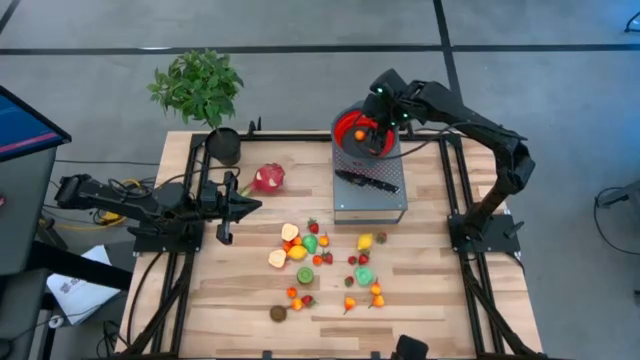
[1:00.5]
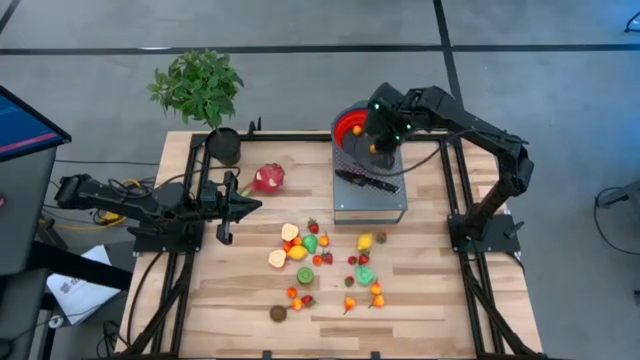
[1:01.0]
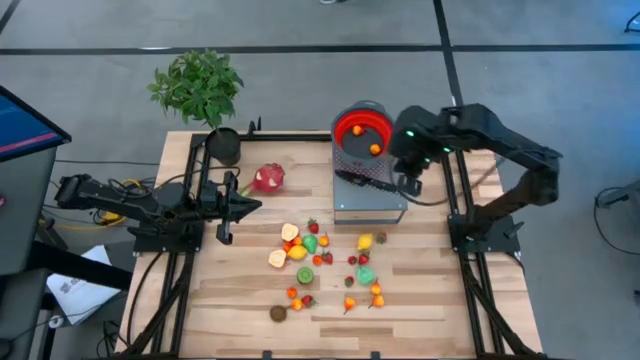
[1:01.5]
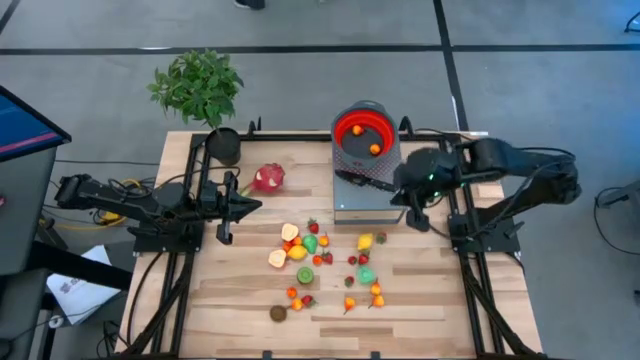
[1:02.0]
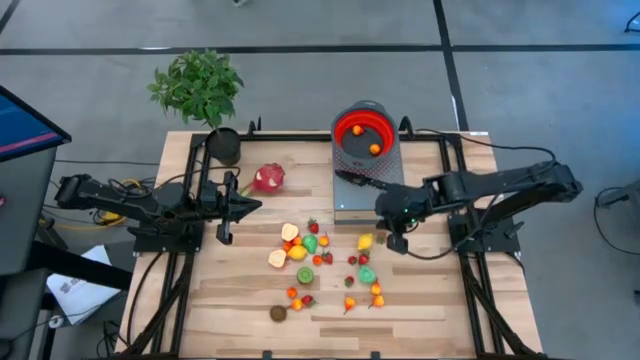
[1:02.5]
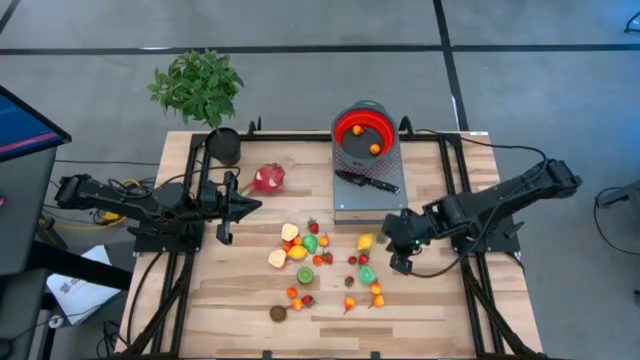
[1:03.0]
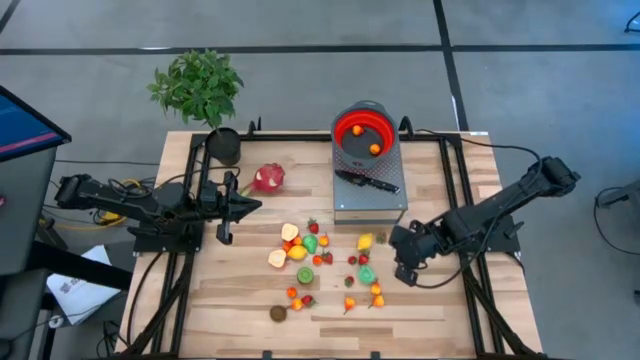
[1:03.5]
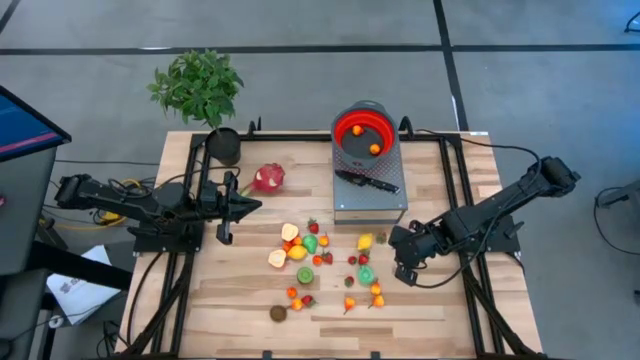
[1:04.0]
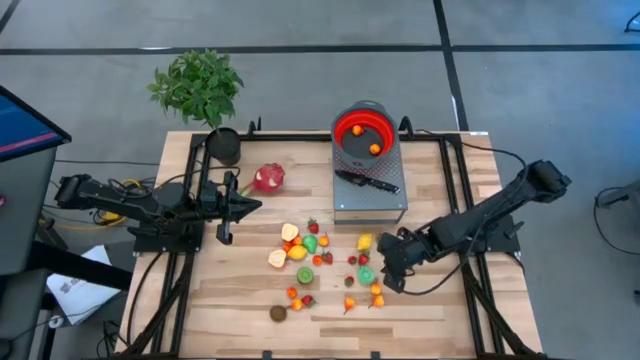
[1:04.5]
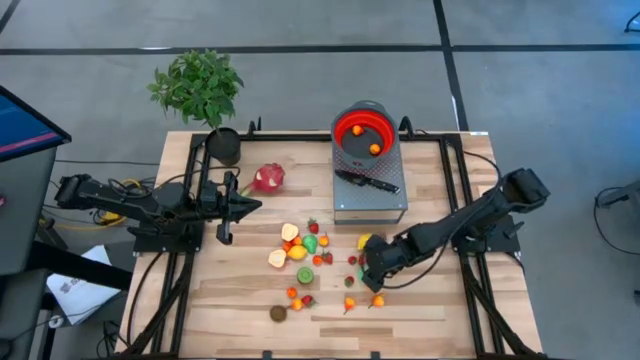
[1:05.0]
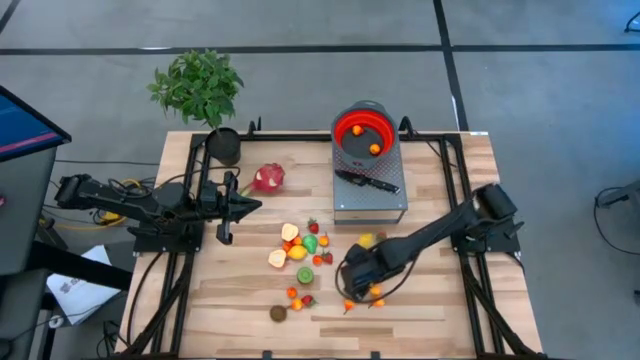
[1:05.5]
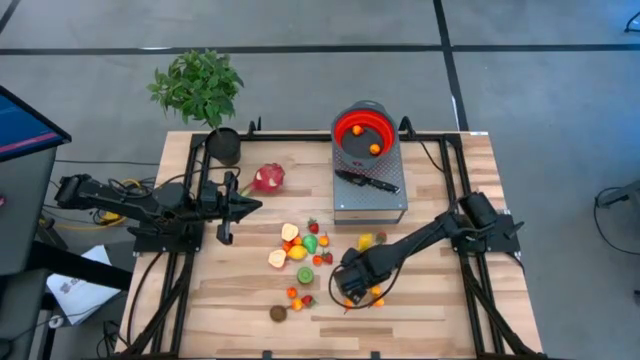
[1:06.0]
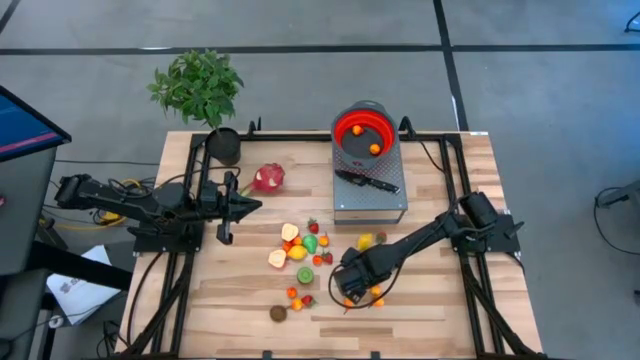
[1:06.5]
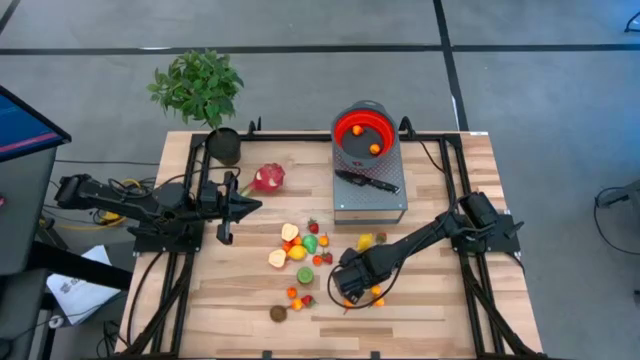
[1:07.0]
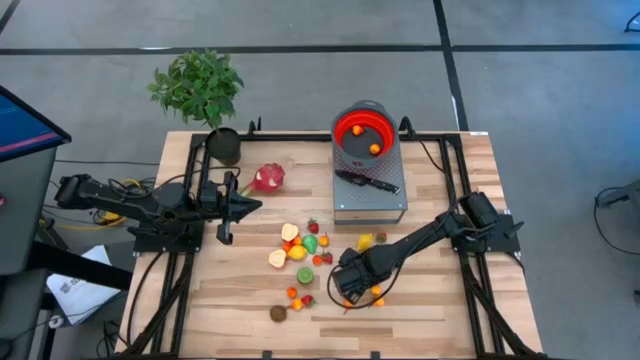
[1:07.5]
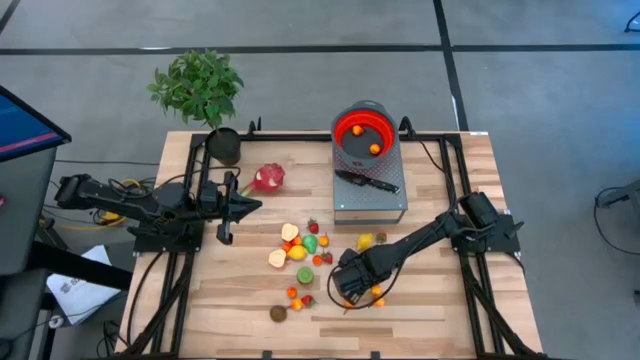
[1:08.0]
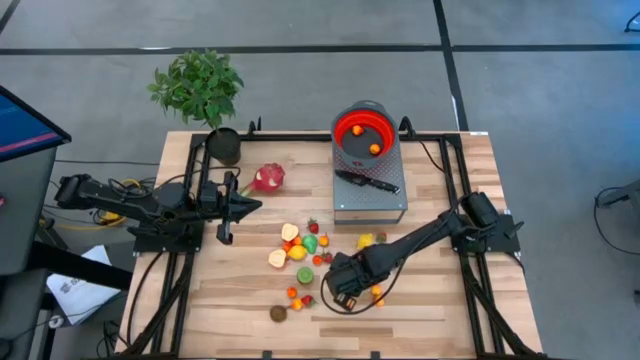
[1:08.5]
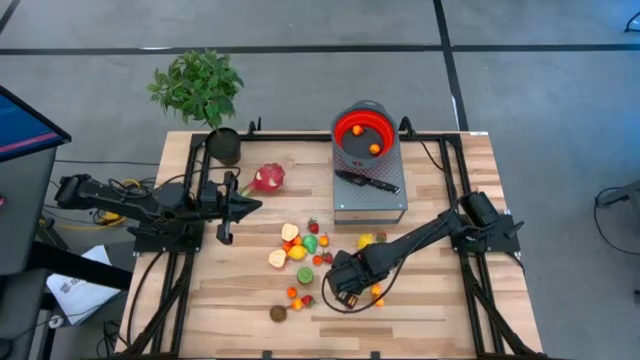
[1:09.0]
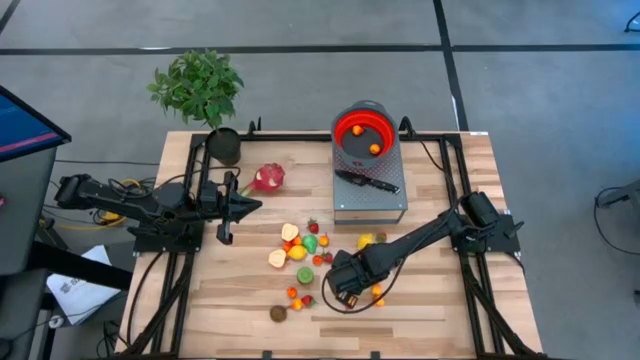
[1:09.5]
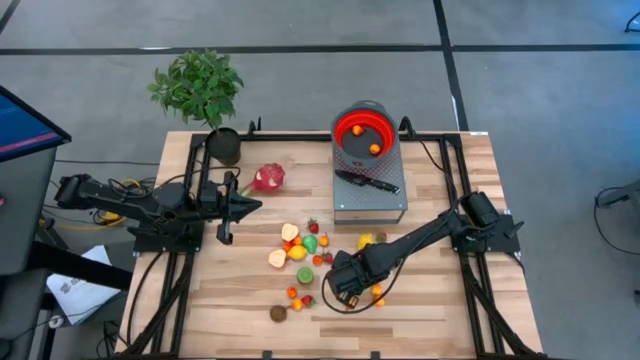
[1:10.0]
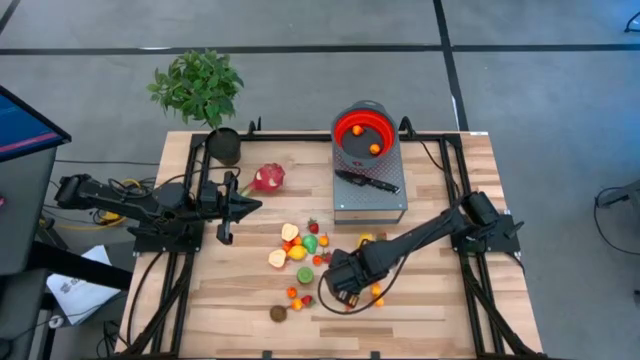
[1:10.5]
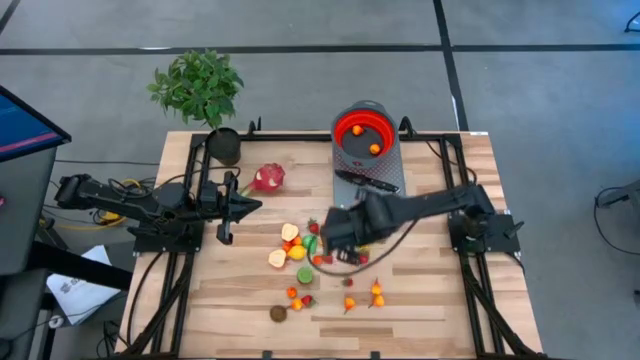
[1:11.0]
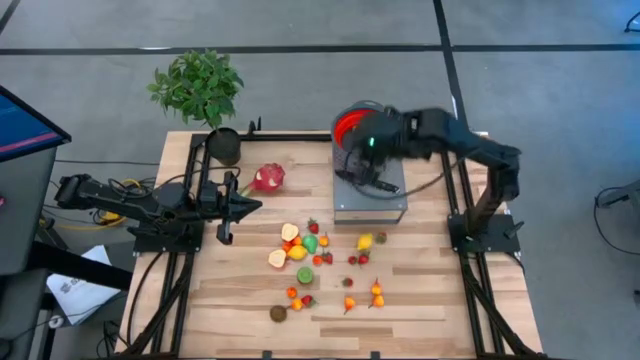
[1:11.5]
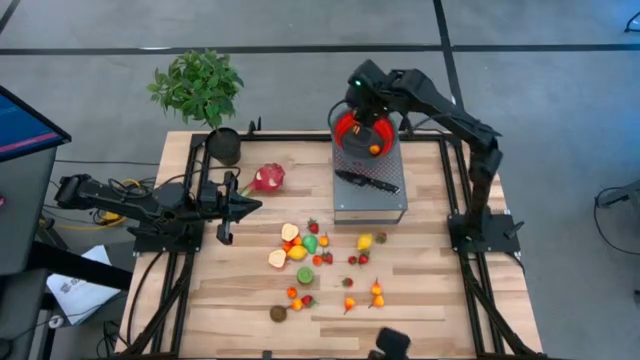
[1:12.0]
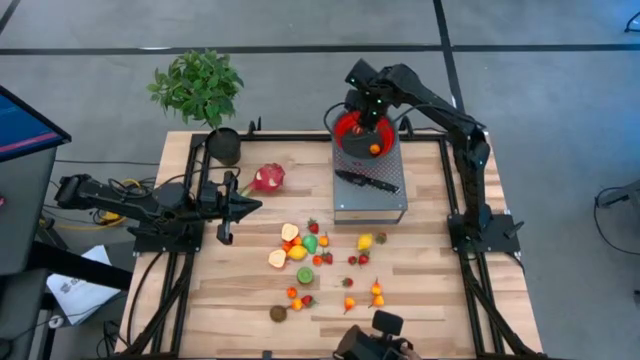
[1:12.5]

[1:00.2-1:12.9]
Task: Pick & Place Fruit
Put the green pear into the red colander on the shelf

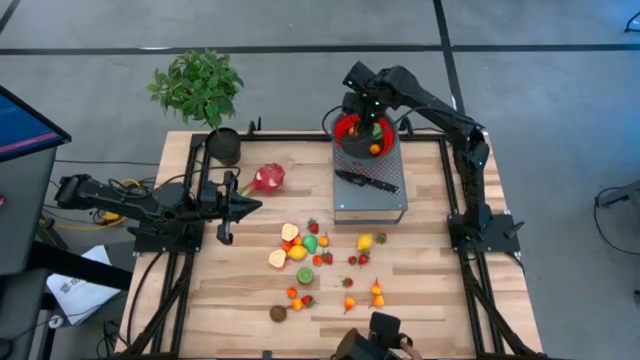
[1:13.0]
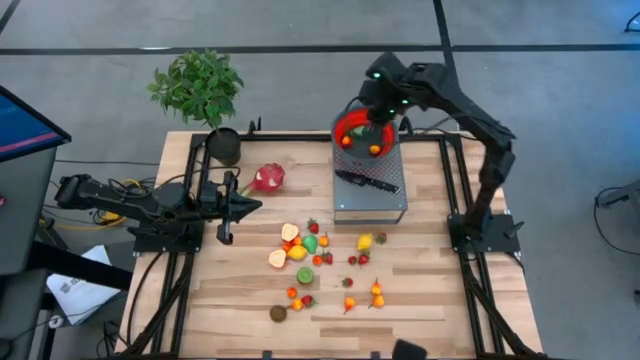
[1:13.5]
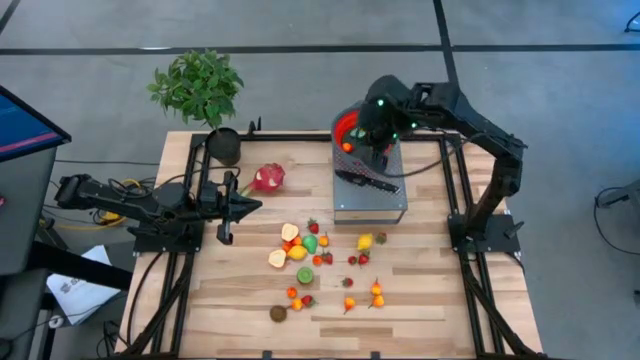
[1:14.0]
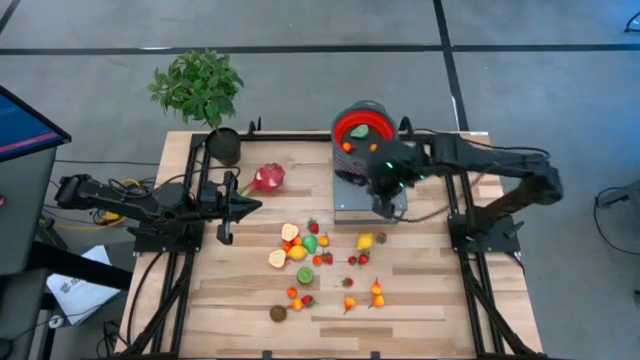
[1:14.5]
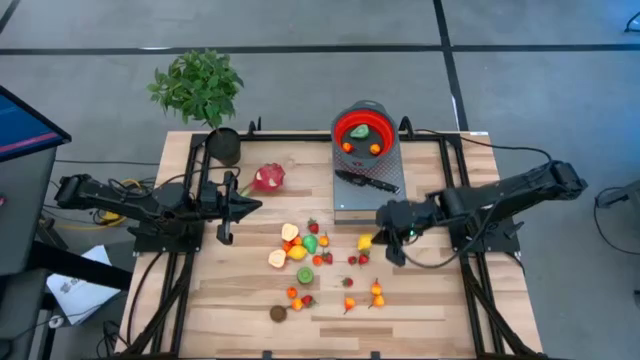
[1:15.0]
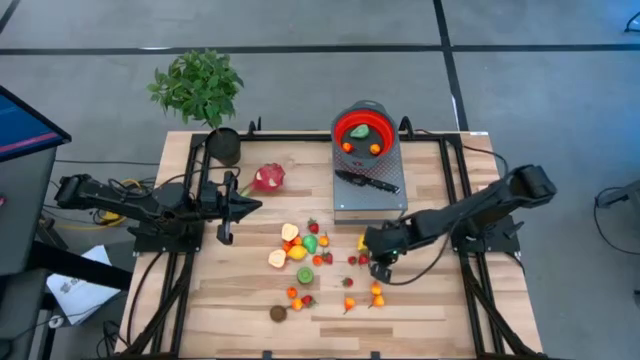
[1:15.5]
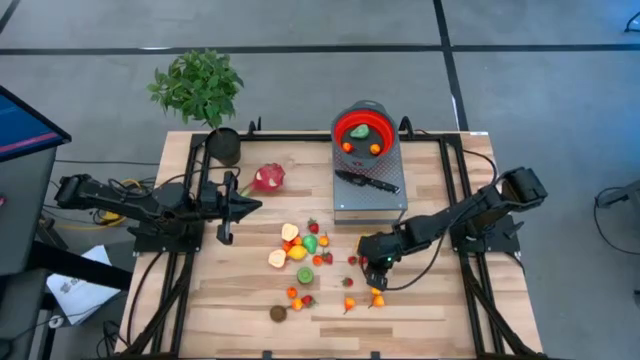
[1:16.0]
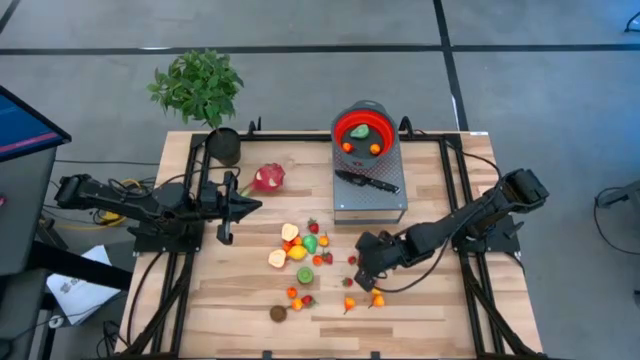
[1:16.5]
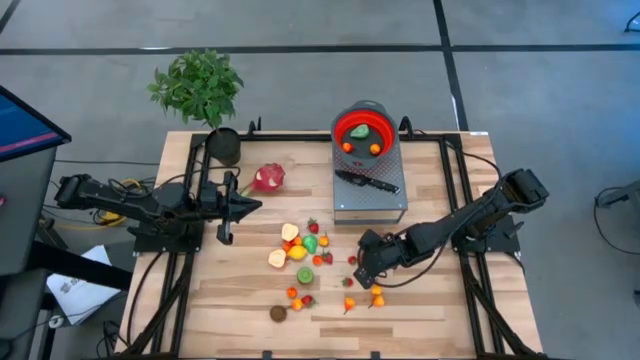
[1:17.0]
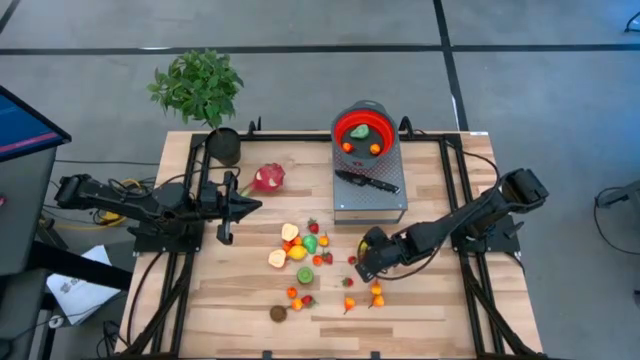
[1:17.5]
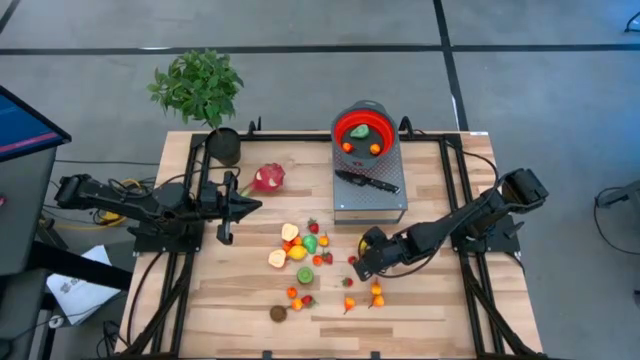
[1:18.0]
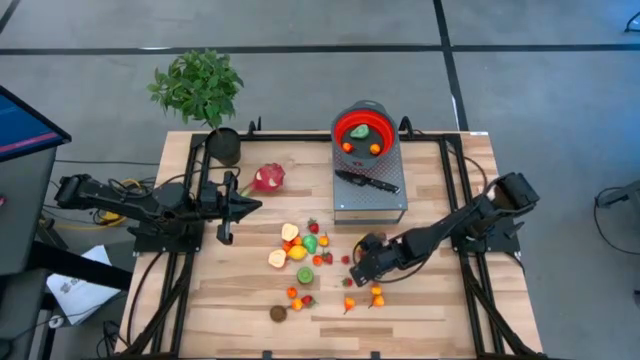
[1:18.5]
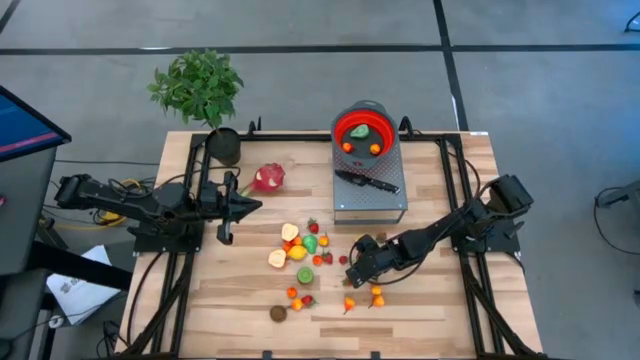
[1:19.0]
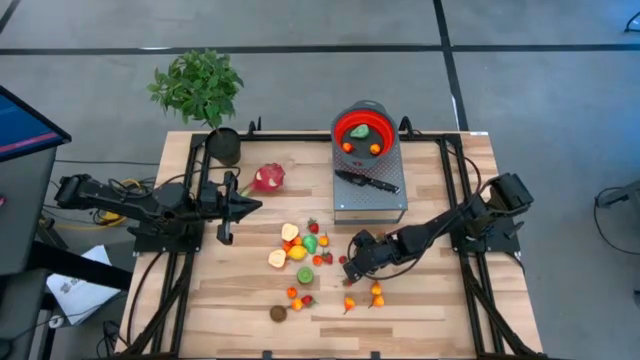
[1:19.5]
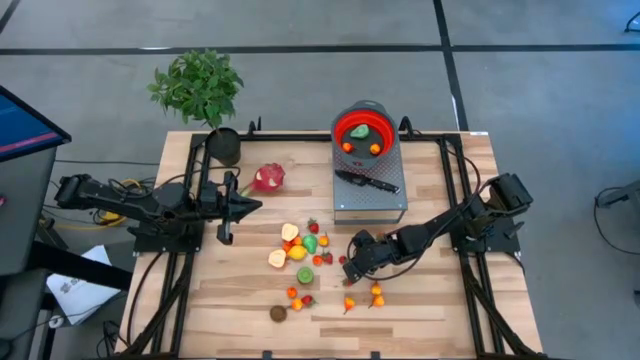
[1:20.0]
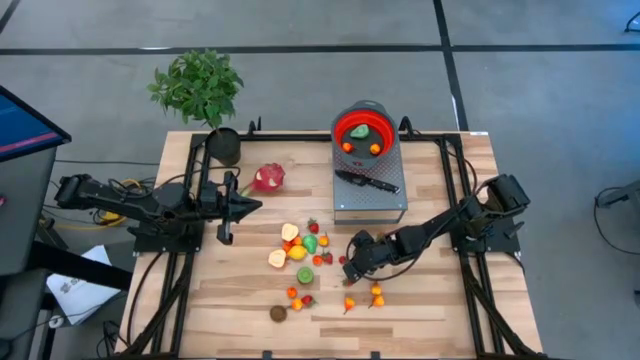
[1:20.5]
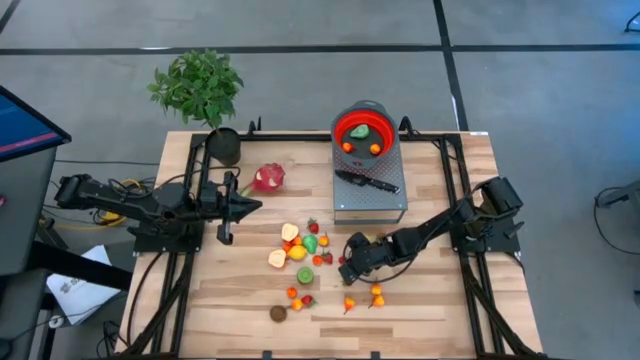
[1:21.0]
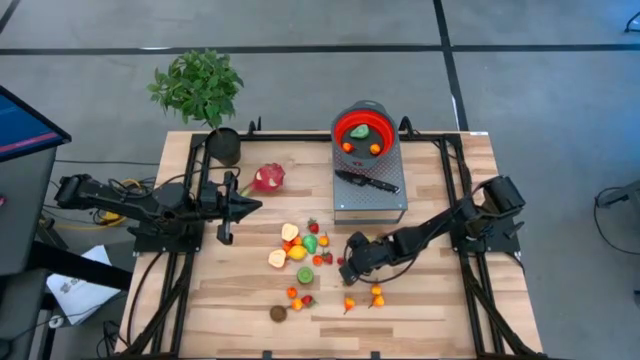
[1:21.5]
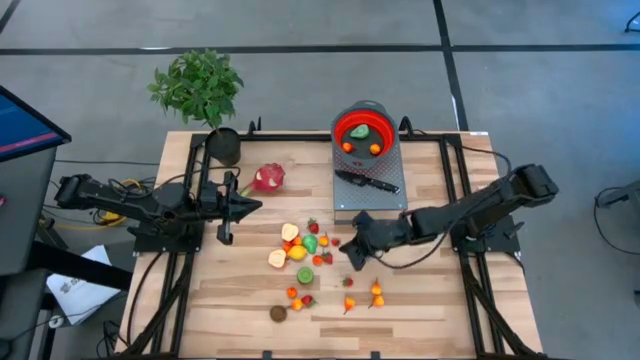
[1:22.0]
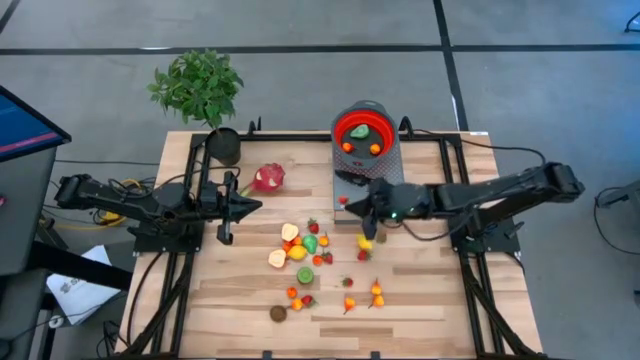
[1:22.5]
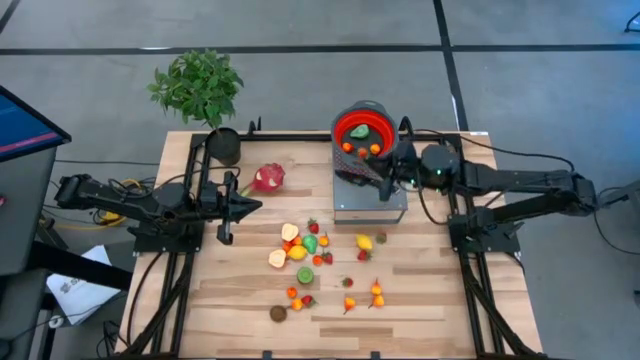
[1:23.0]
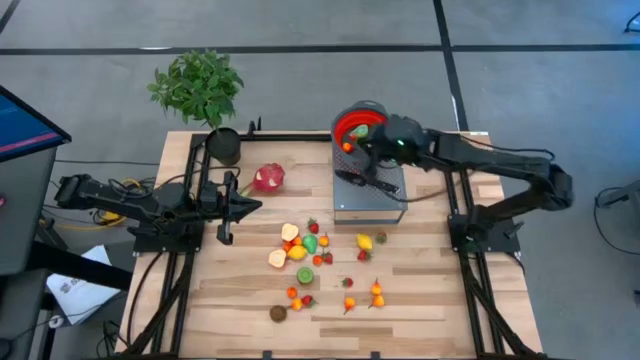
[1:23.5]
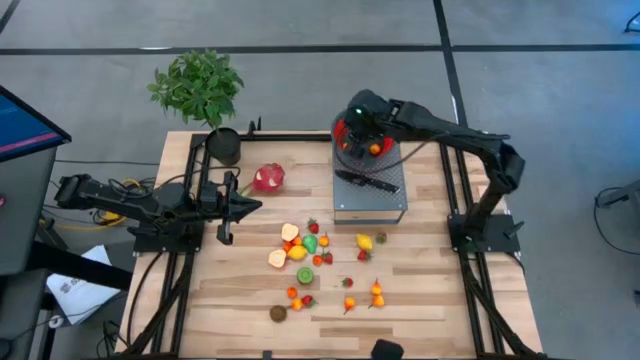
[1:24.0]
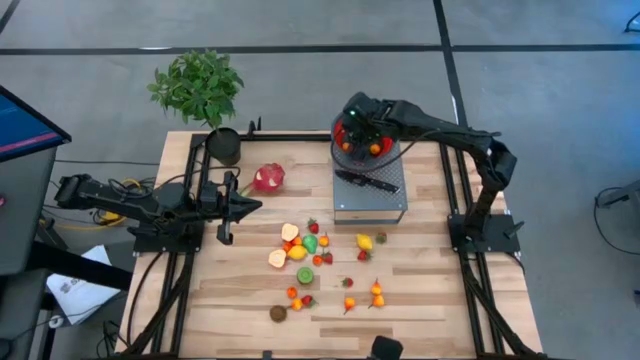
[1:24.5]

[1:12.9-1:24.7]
Put the strawberry into the red colander on the shelf
